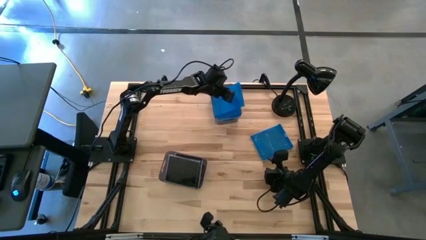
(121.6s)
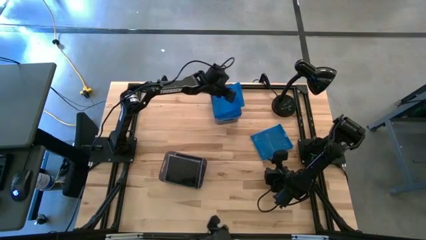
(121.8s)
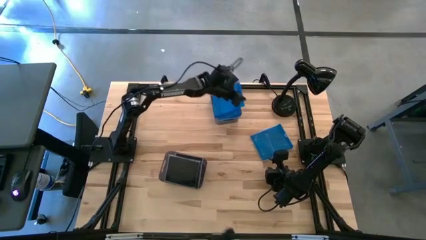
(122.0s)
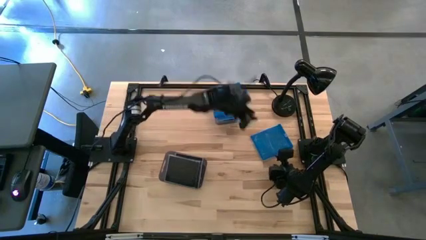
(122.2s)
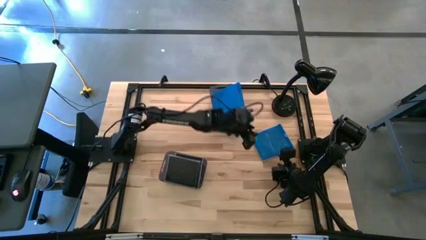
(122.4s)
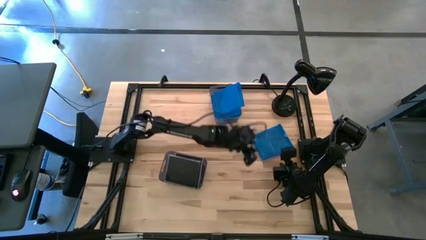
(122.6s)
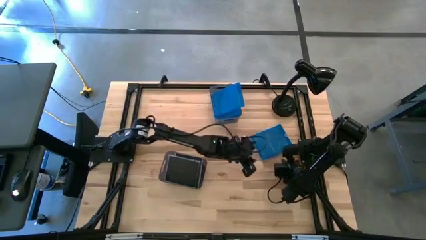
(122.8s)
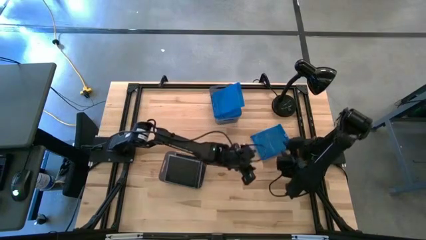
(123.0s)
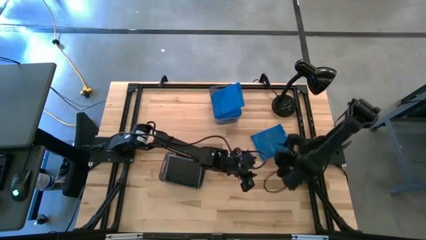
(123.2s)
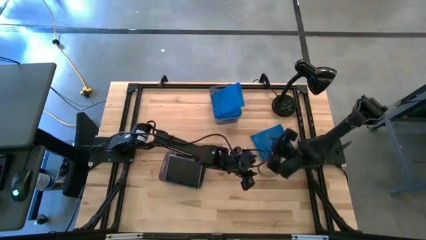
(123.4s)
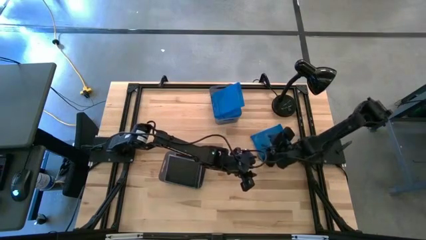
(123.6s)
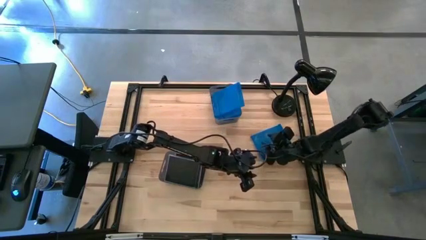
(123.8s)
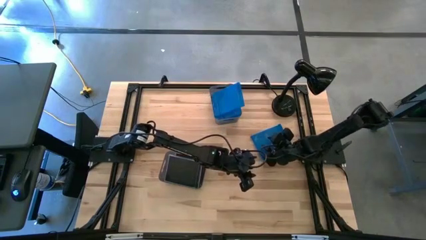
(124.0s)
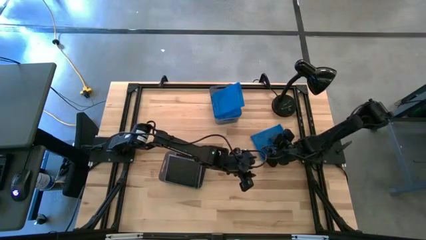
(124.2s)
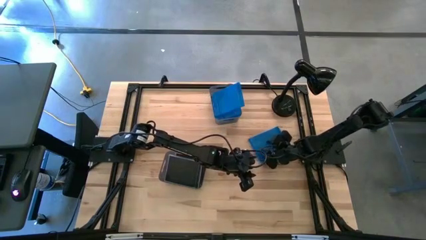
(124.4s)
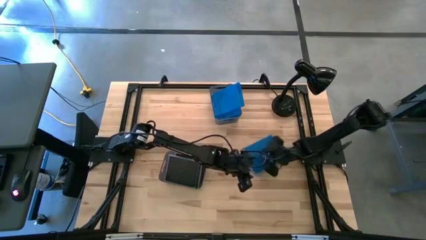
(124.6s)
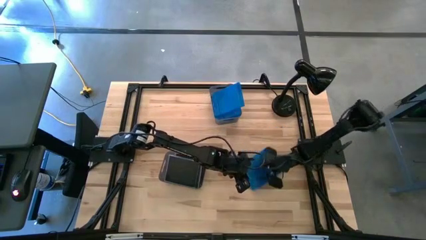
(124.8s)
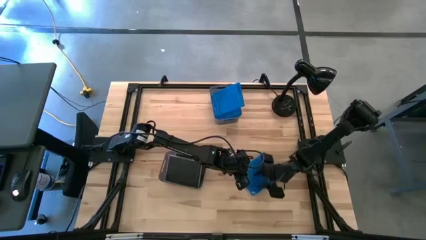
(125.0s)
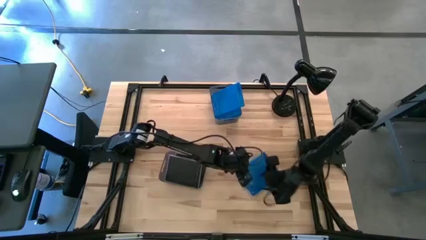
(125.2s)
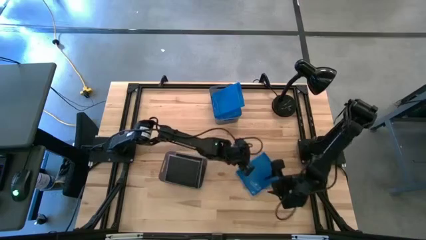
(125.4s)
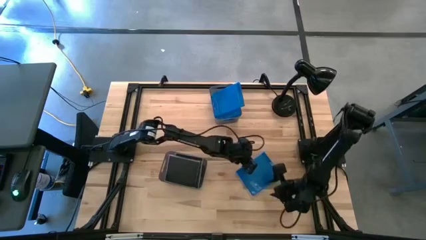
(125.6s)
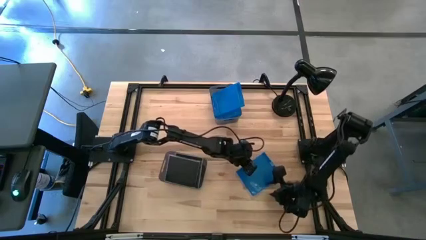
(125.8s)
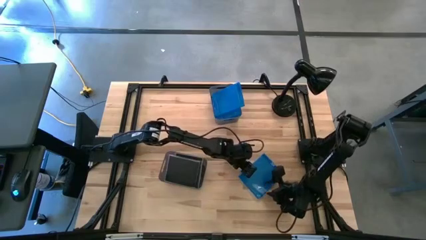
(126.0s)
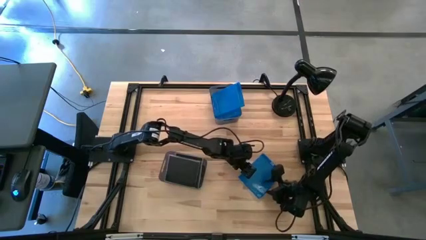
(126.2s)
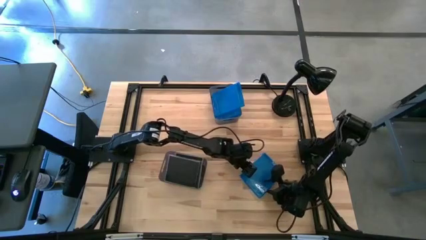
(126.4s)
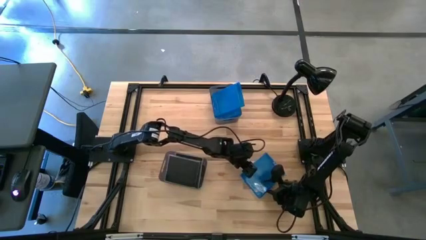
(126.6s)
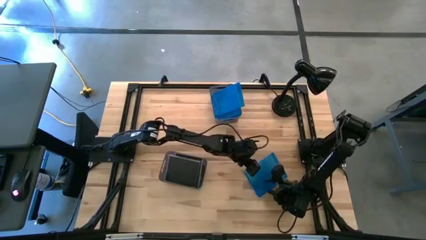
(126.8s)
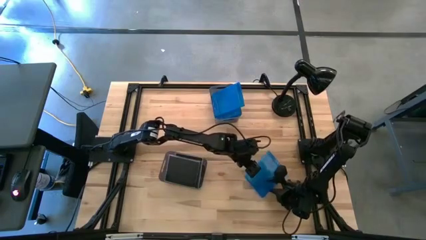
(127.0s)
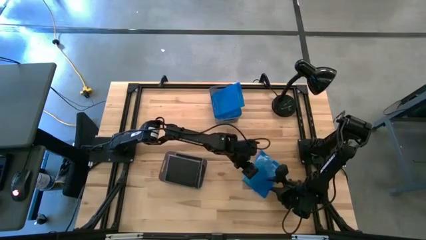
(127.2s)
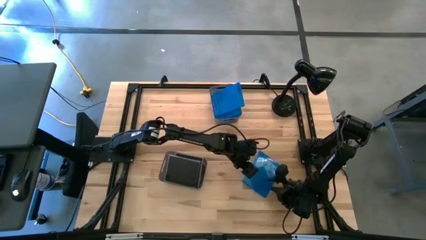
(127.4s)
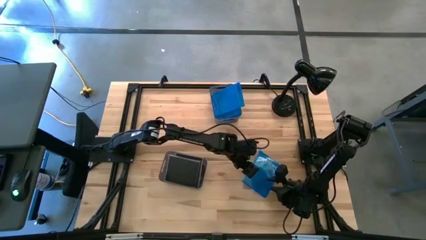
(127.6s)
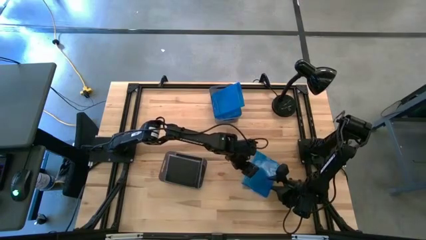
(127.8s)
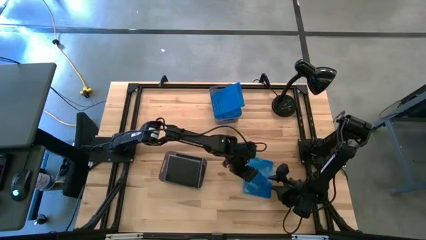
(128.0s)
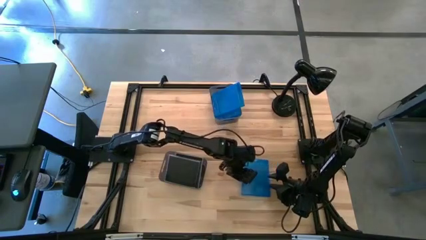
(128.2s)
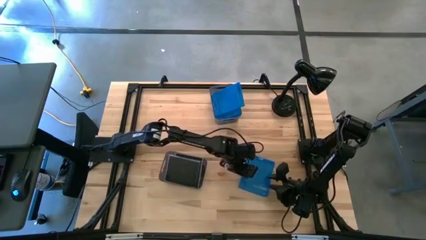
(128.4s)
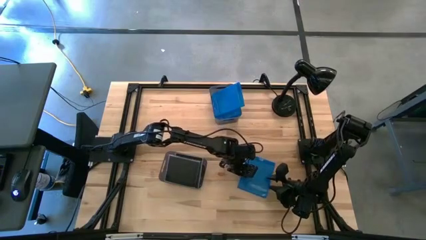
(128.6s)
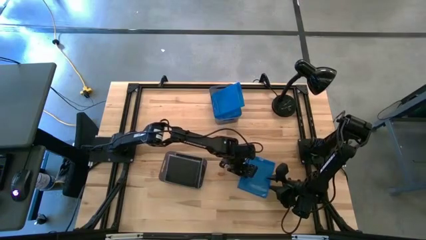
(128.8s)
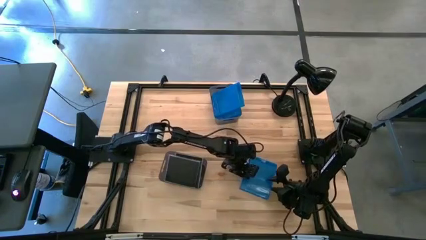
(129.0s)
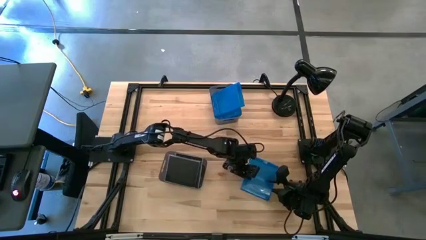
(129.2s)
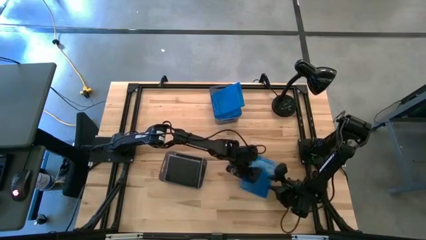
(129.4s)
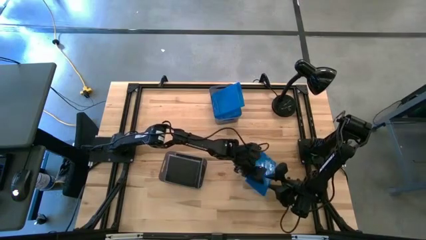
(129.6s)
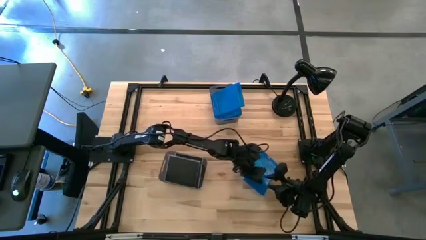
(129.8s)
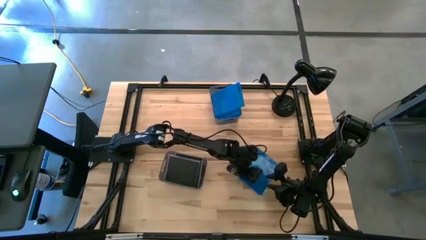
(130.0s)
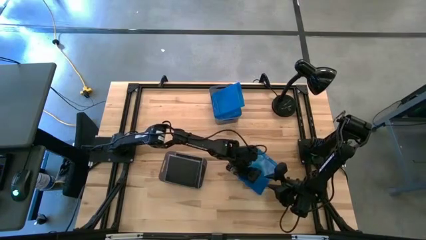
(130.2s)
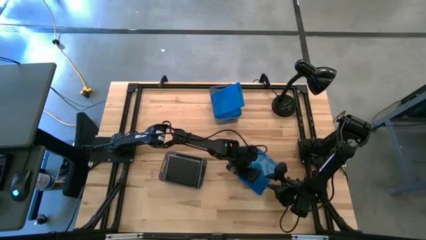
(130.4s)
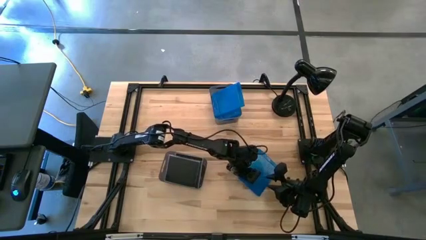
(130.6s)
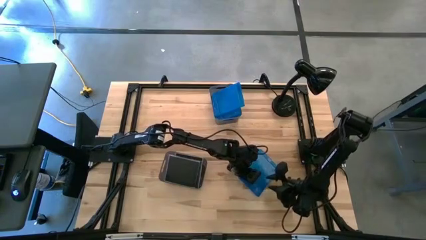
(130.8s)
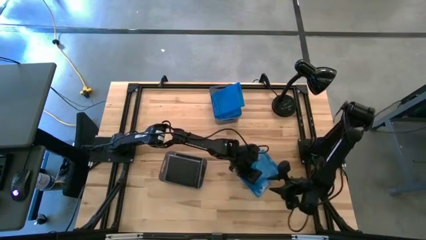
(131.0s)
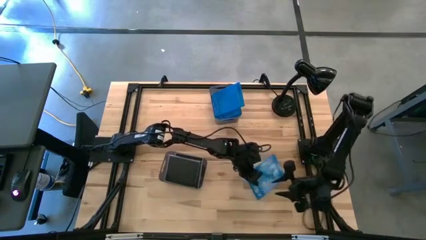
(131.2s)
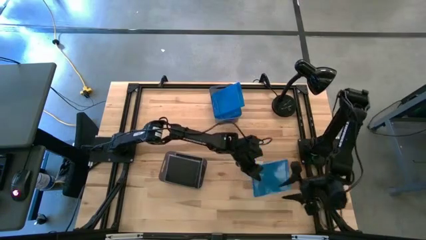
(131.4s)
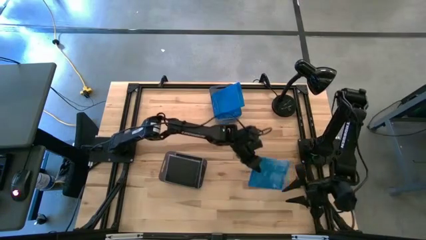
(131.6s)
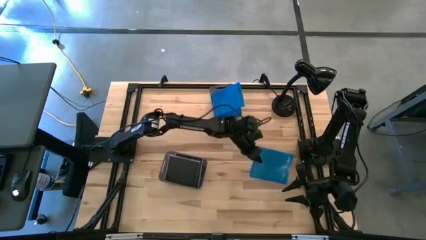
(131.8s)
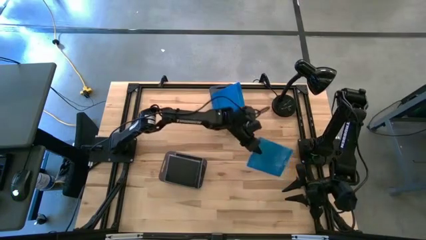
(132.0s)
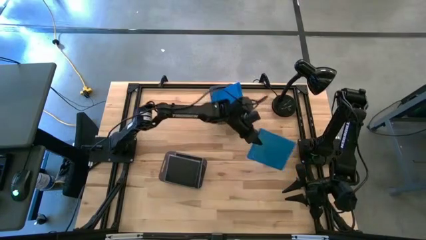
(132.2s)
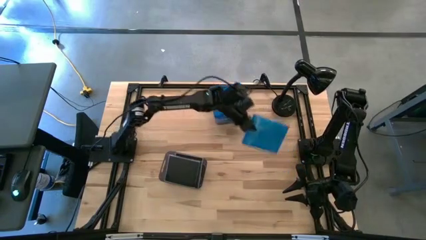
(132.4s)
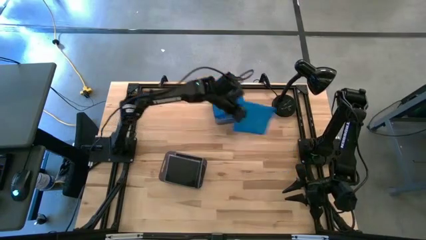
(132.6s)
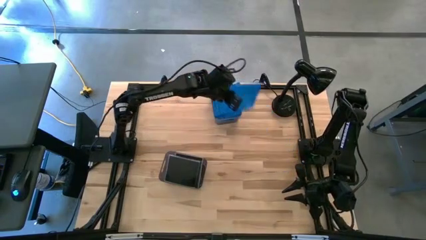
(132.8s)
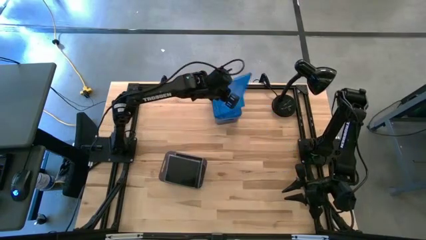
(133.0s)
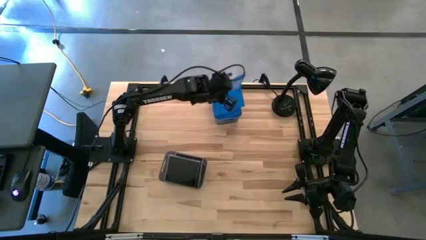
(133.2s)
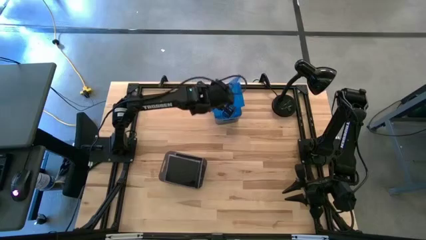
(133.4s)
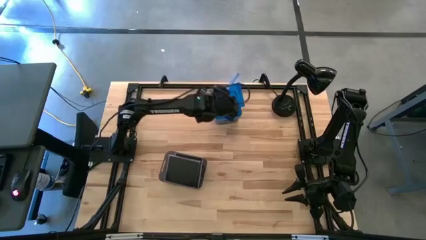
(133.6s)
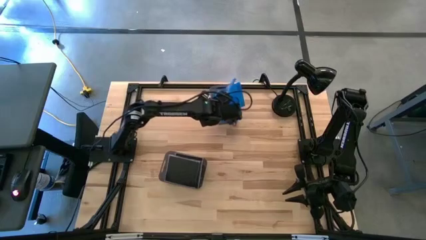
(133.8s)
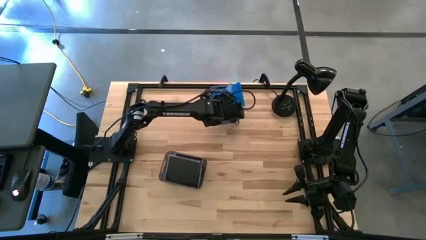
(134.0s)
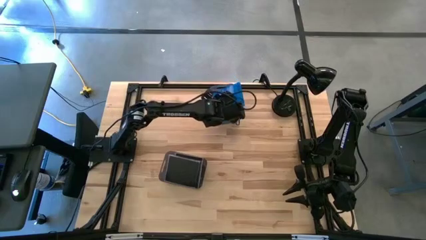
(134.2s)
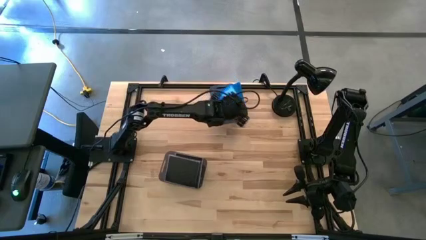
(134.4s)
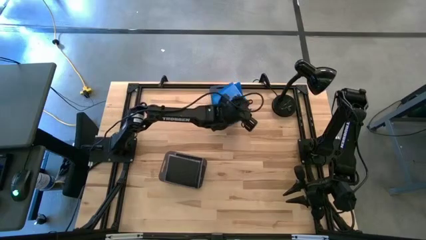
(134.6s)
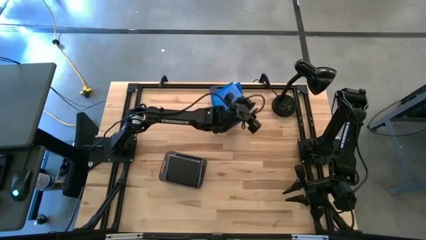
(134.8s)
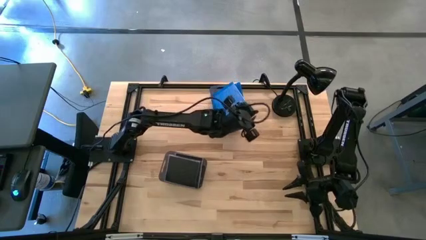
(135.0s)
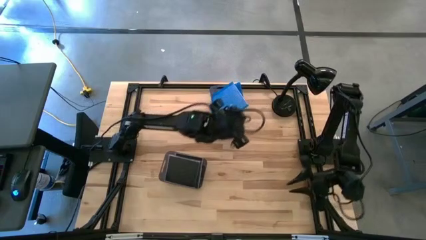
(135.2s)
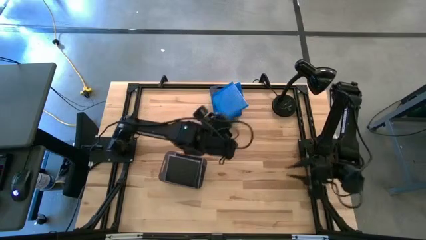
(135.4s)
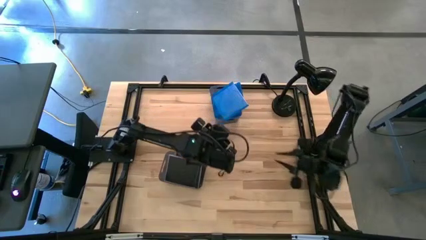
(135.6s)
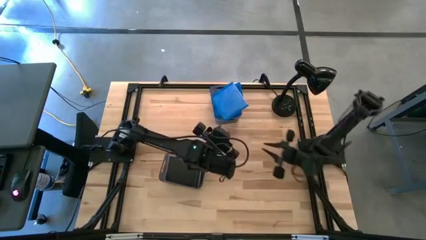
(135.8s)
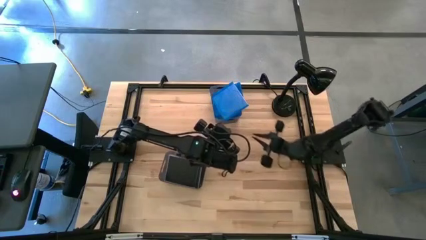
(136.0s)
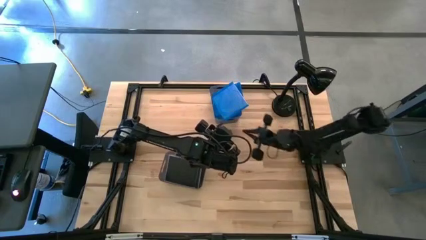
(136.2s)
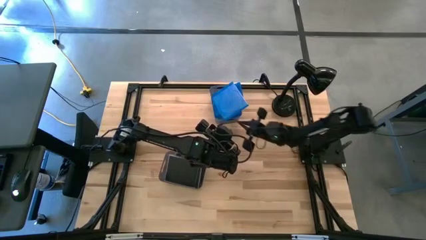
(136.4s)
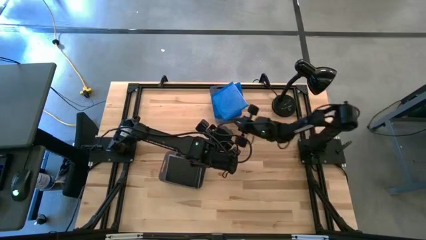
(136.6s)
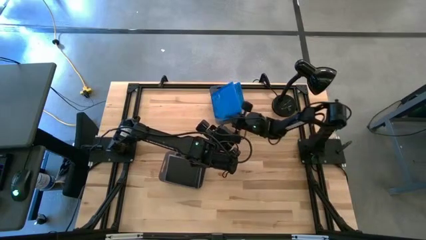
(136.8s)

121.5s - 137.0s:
Task: Pick & place jewel cases by type
Put the blue CD case into the top black bin

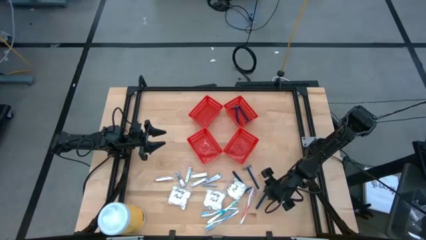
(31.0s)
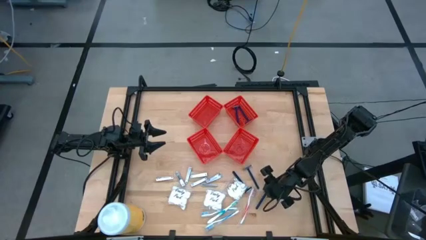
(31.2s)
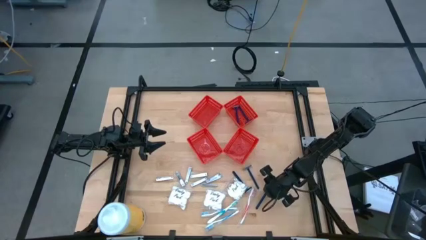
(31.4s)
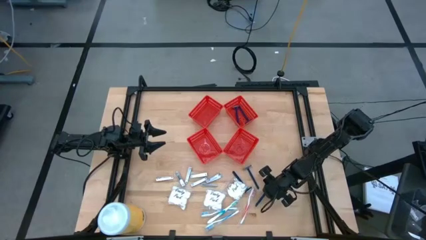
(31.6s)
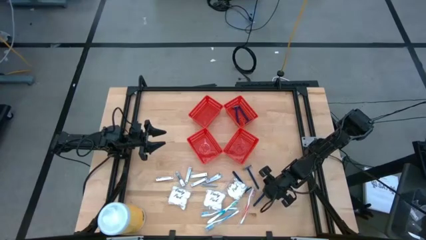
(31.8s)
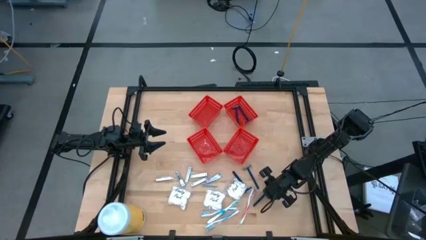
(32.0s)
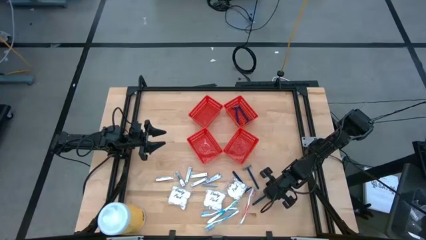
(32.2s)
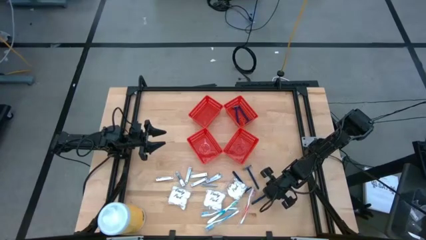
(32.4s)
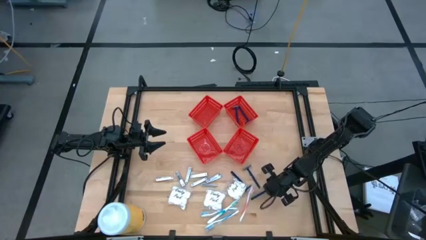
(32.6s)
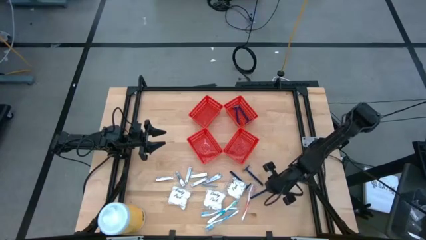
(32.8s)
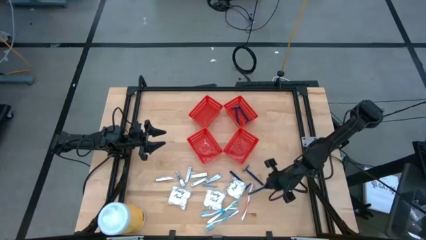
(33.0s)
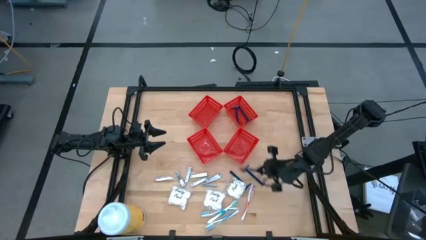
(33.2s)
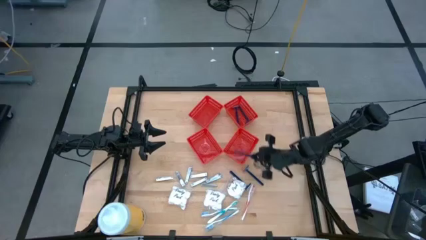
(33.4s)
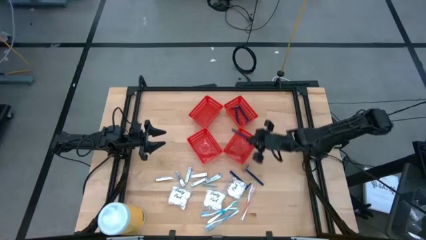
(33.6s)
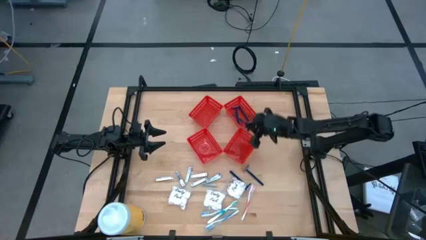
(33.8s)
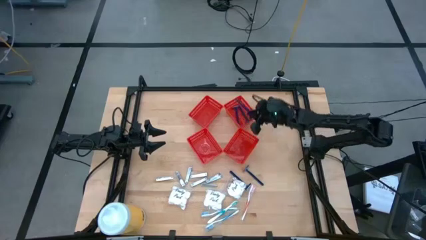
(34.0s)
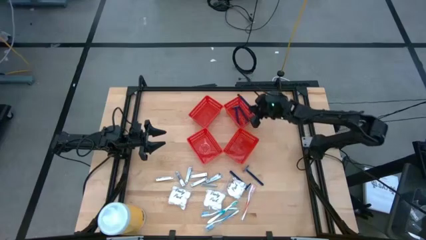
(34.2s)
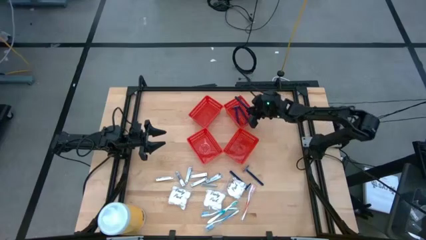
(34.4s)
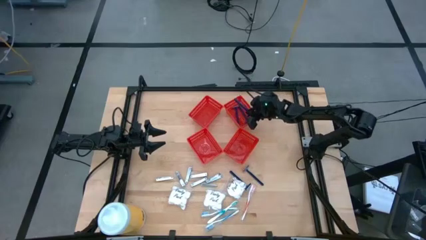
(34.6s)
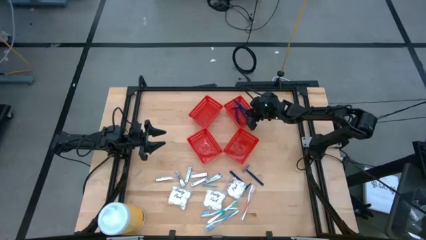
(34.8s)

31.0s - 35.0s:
Task: Pick & Place Travel size toiletries
Put the blue razor into the top right red bin
